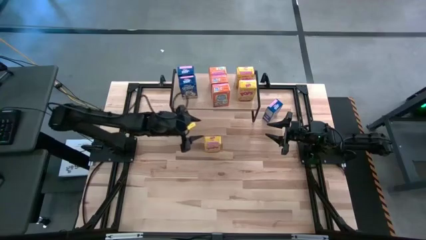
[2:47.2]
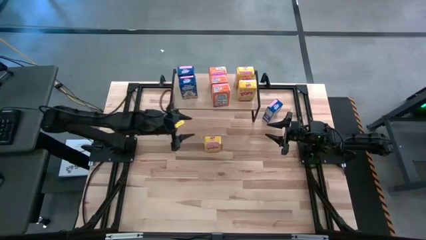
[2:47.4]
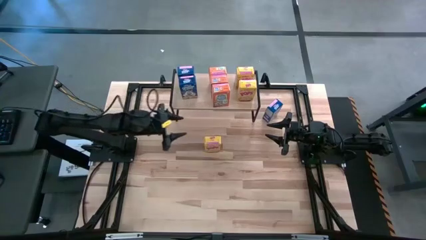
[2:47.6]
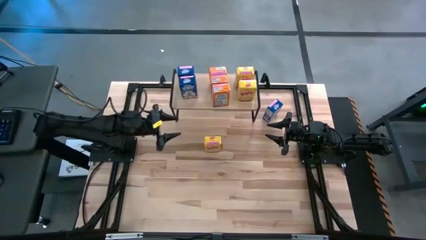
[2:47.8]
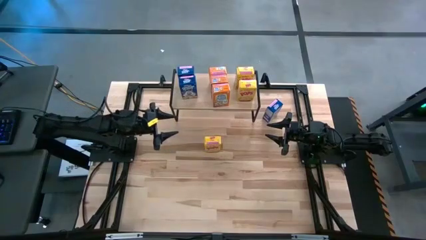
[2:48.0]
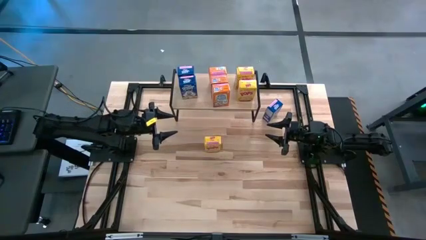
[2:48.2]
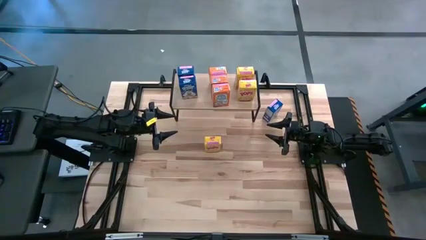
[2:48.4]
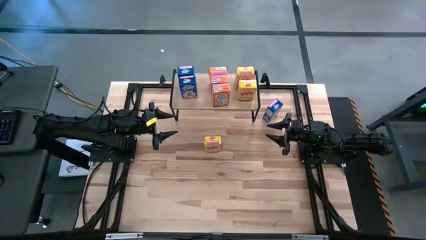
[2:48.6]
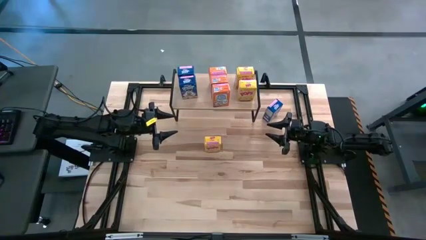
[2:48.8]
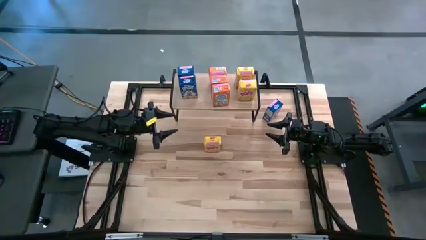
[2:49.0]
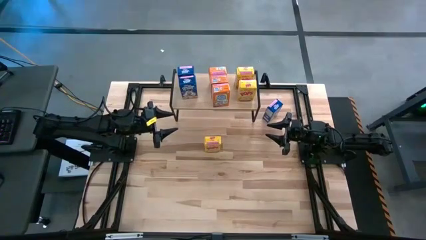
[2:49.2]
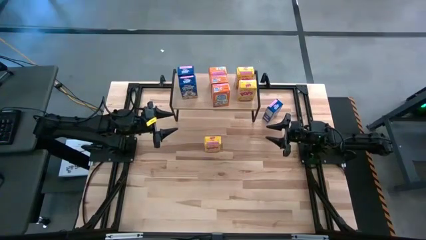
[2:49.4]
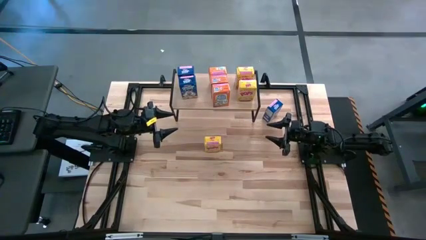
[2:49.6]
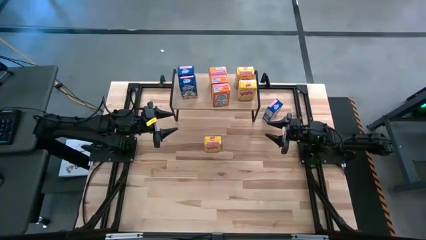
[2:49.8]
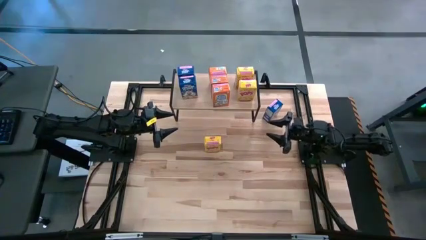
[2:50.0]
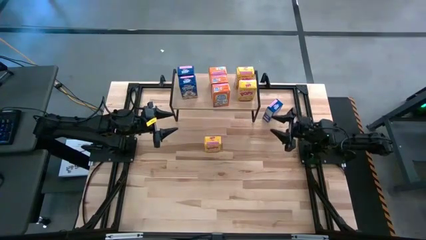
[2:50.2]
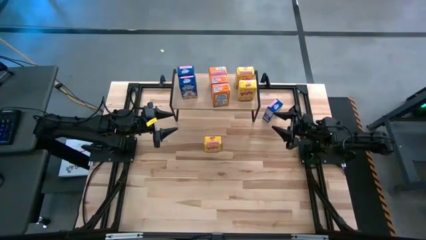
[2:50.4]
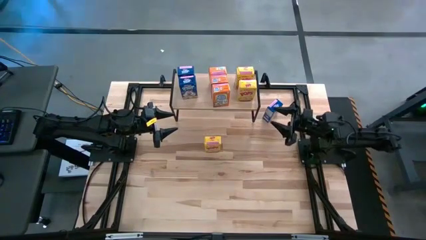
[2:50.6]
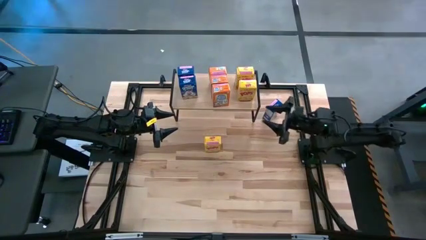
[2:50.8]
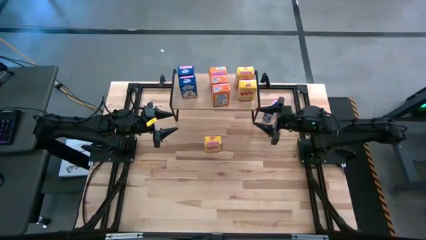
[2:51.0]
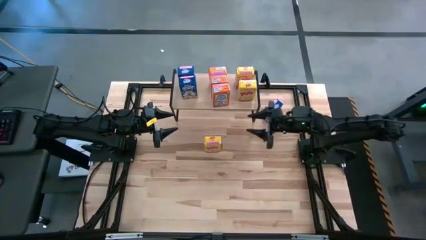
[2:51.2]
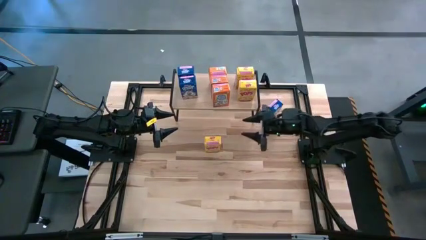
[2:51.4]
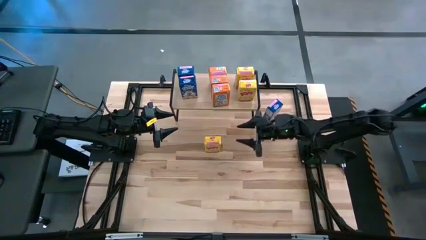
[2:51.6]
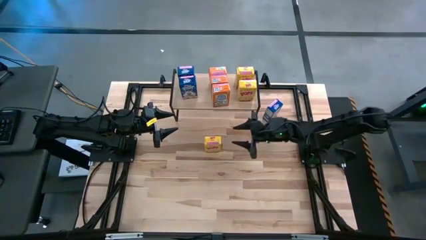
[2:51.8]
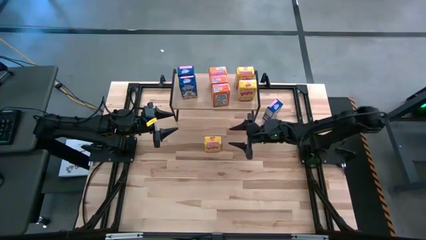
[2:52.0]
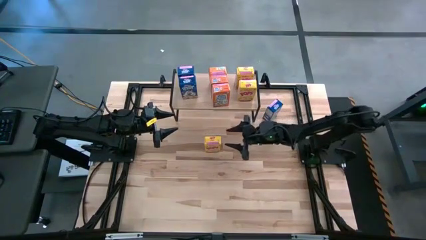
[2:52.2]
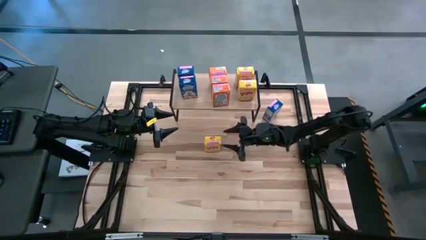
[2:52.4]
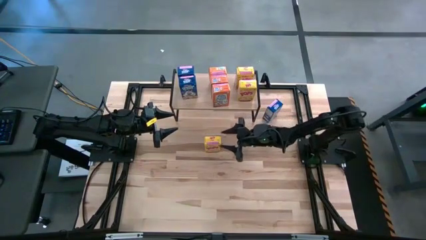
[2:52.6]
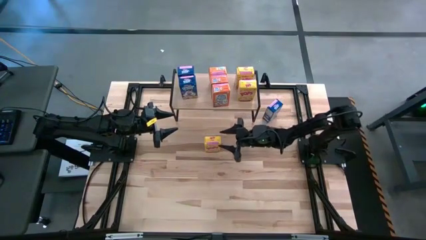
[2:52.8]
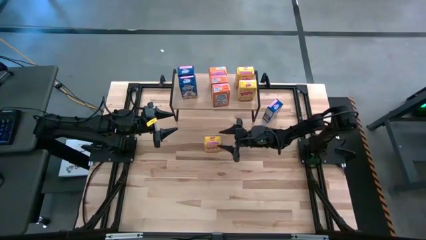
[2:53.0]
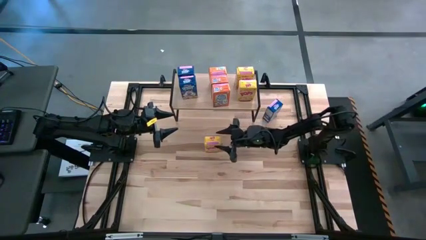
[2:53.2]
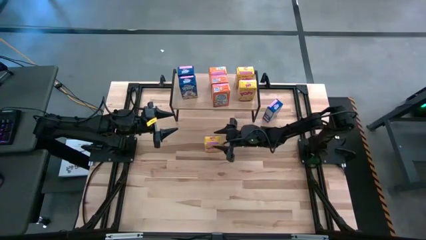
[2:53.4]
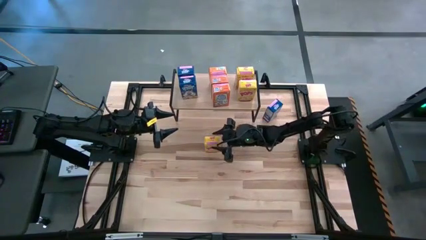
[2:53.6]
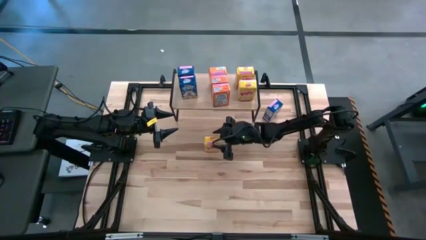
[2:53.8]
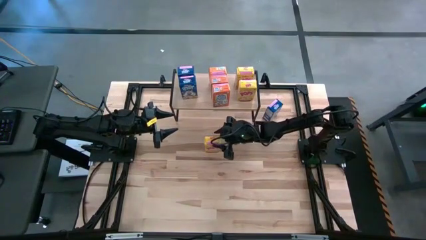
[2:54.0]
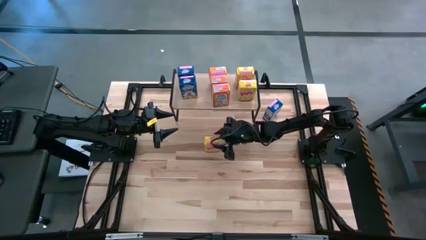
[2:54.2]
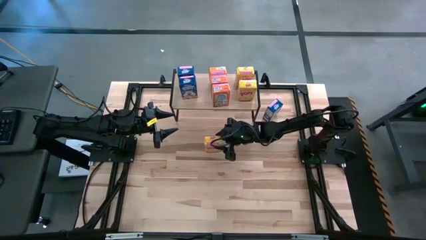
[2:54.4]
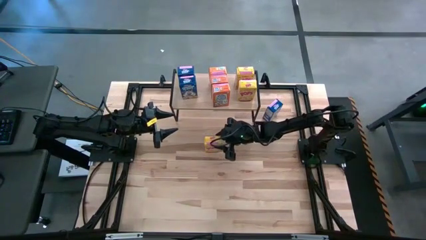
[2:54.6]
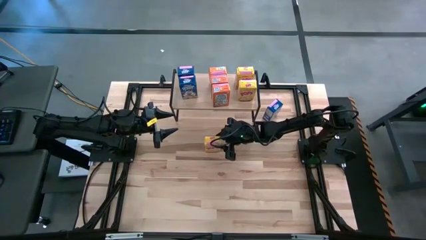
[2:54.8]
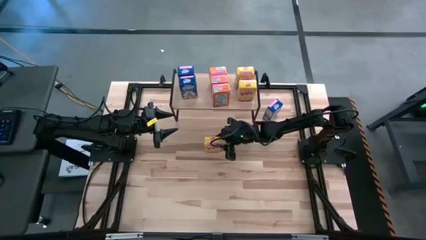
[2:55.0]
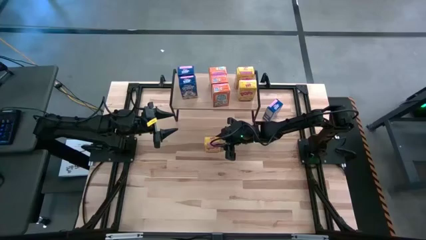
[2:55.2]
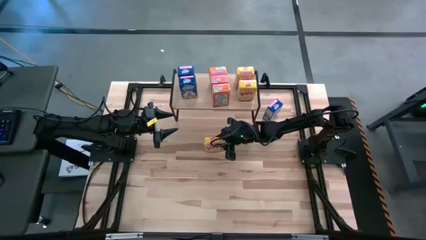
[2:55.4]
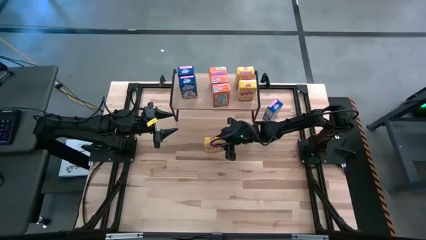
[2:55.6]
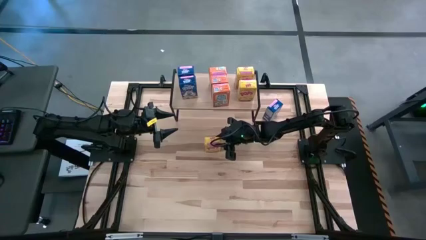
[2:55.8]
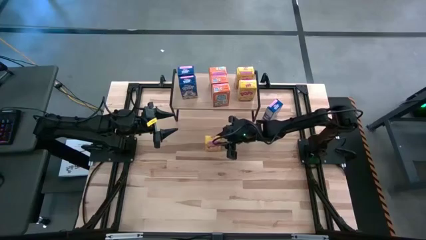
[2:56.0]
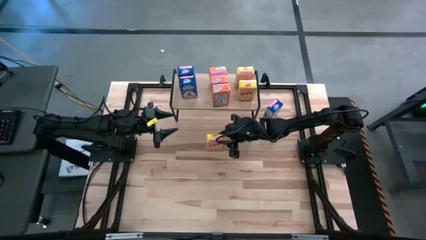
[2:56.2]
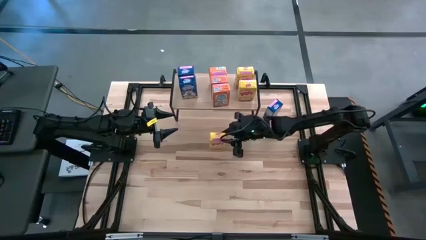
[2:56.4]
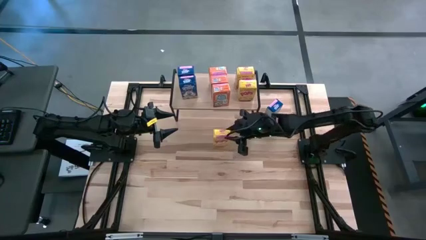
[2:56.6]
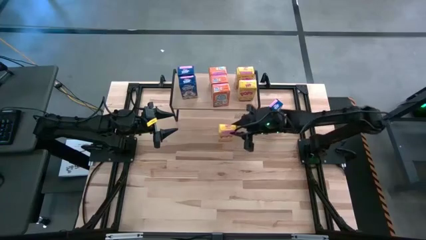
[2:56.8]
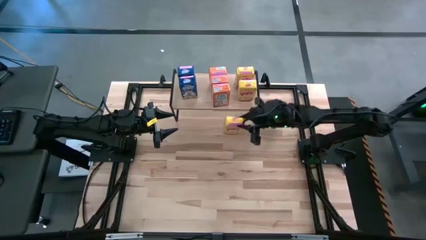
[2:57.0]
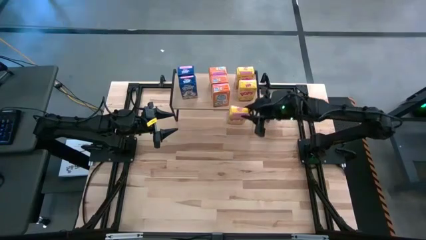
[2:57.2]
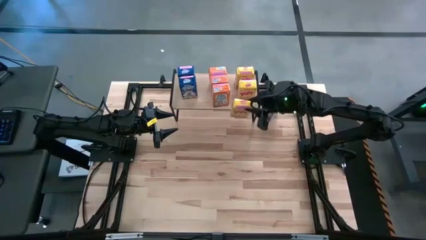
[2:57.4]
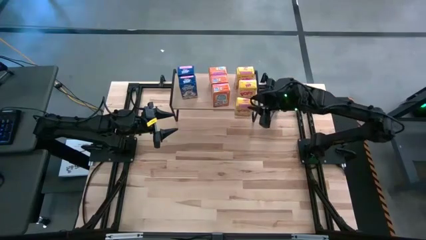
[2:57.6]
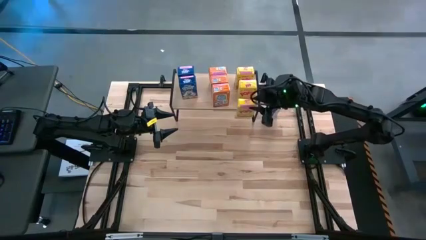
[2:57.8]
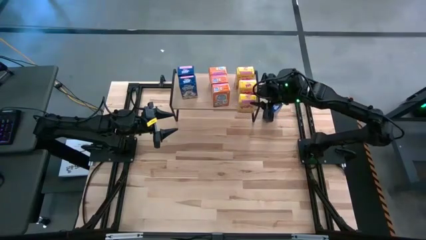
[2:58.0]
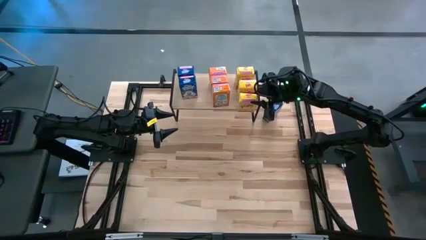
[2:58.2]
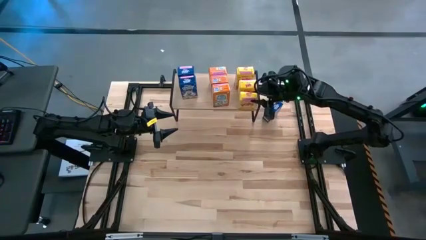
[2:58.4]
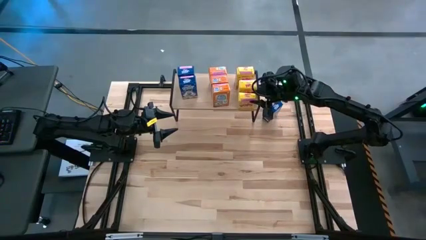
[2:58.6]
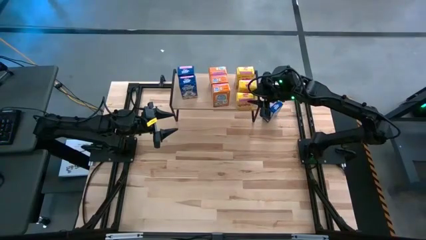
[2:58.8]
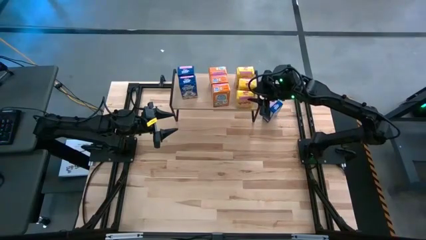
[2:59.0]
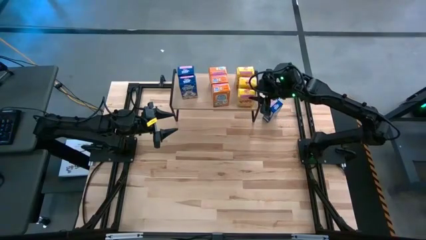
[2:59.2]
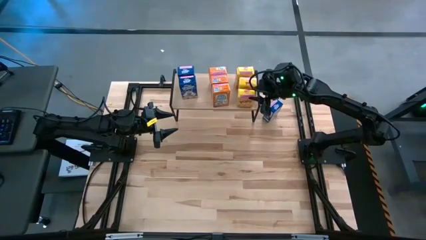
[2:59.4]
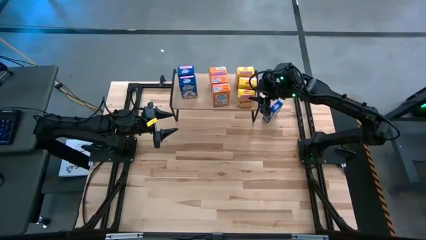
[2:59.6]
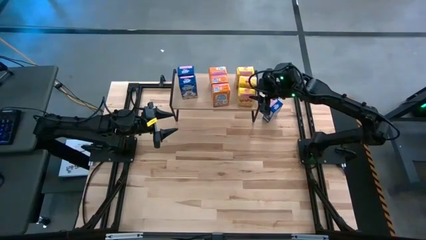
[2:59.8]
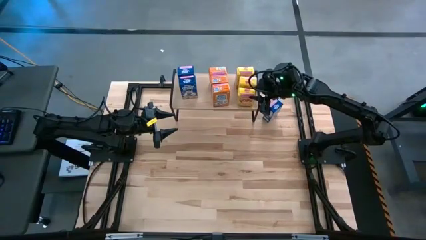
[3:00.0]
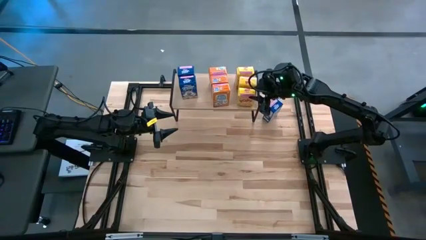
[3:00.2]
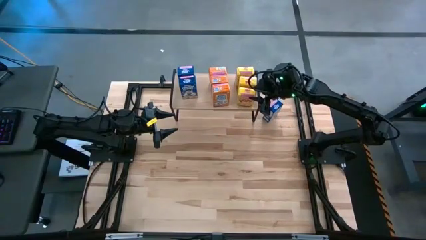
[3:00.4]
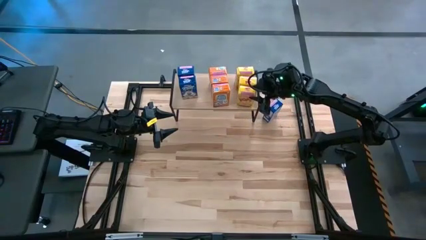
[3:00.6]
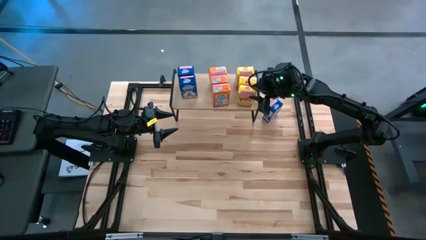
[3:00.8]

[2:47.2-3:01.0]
Task: Stack cereal on shelf
Put the yellow cereal box aligned with the other yellow cereal boxes on the shelf
